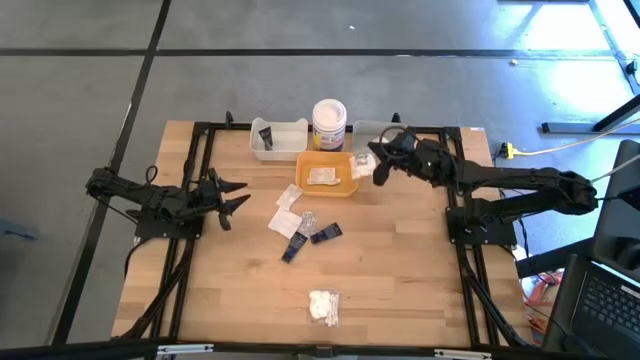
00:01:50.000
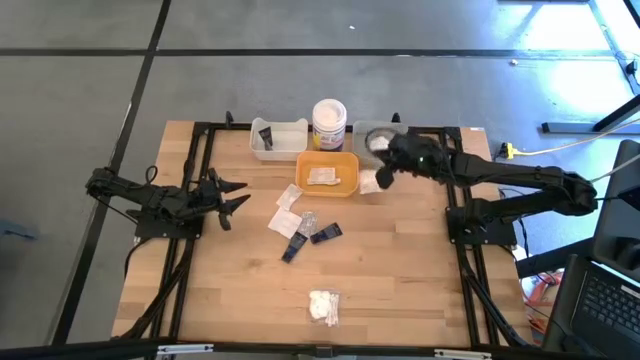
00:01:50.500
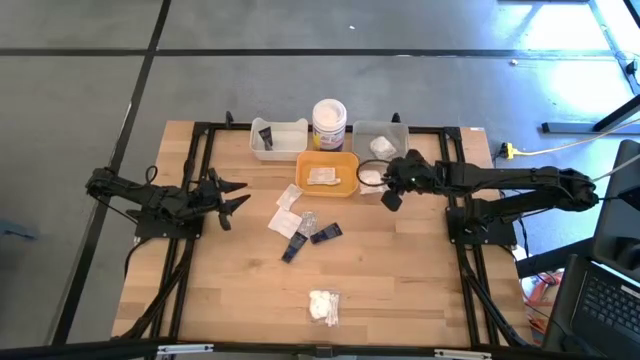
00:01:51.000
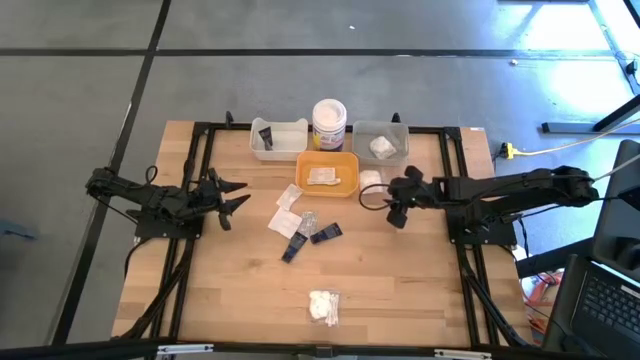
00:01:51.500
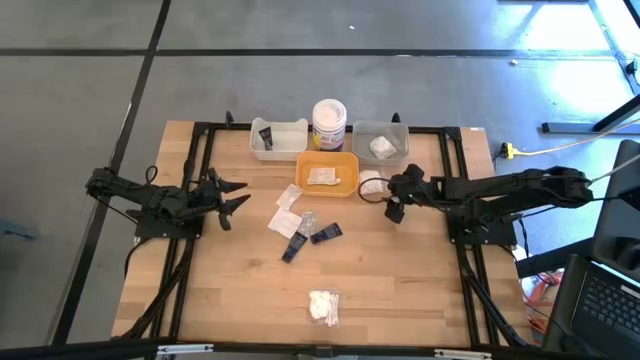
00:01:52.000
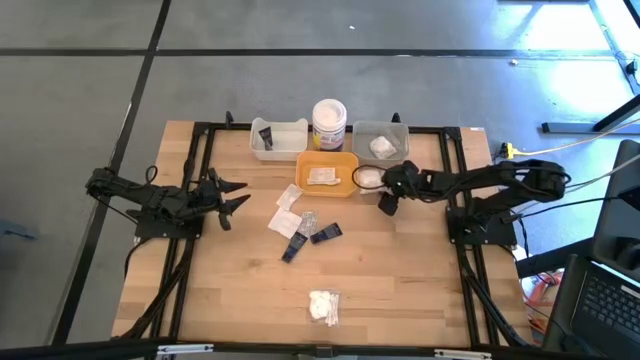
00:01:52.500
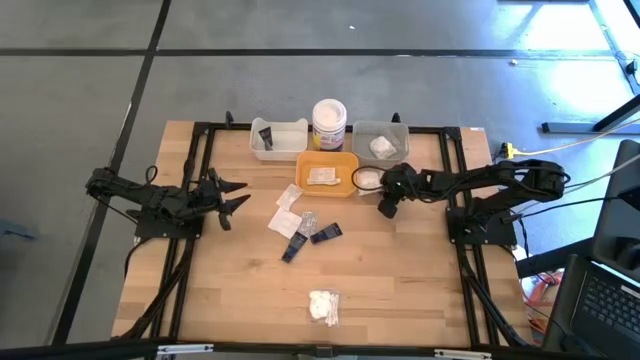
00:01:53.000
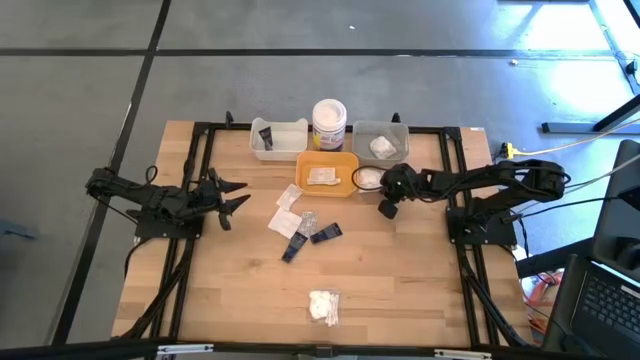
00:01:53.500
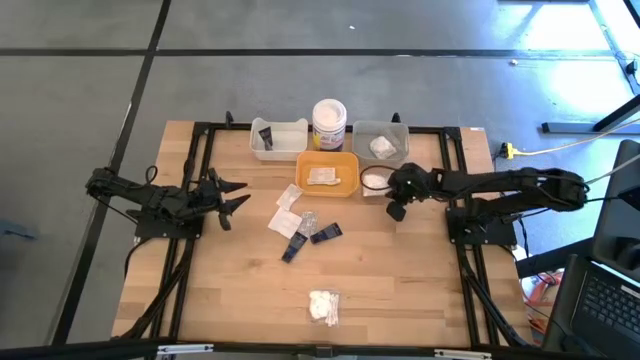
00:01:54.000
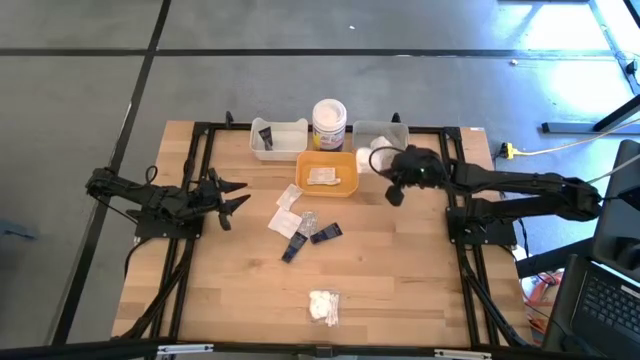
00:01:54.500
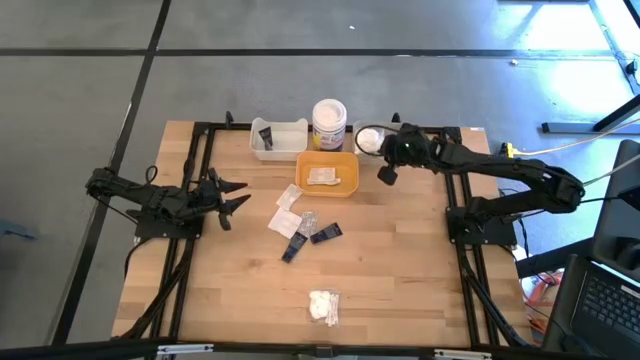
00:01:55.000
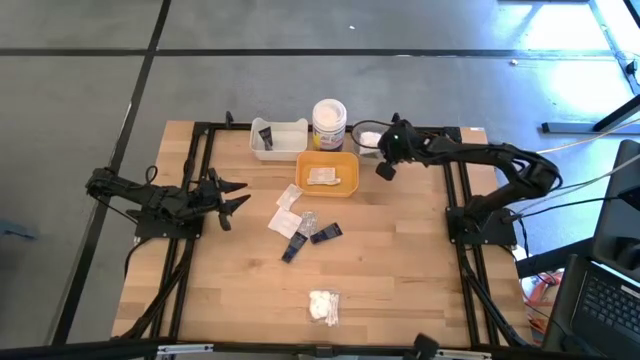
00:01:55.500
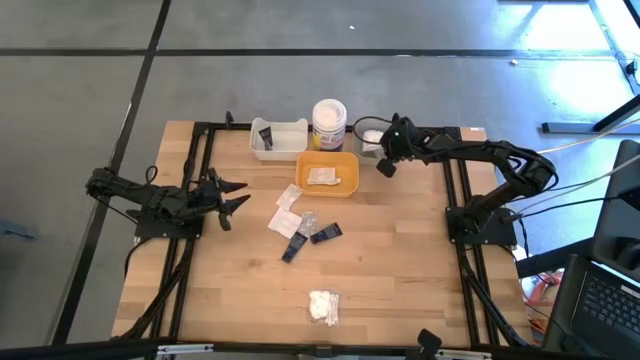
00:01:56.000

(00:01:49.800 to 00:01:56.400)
Task: Pick & Place Travel size toiletries
Put the white cotton pack into the gray bin

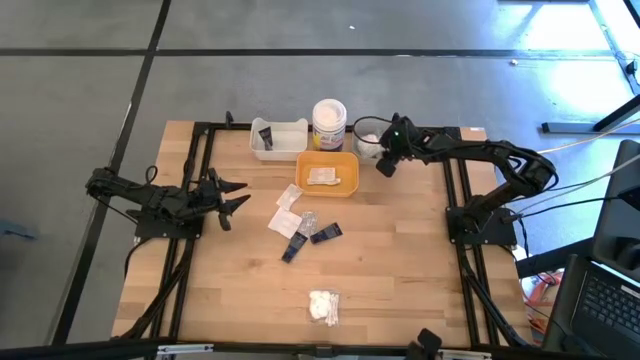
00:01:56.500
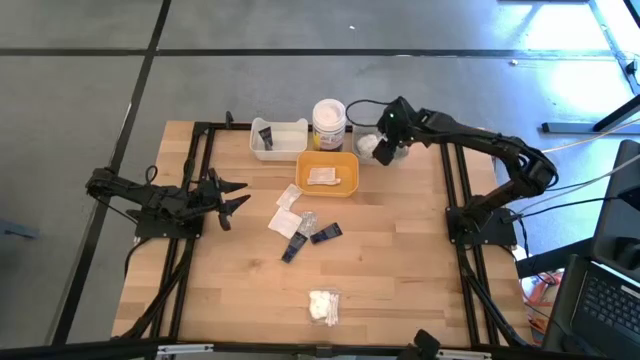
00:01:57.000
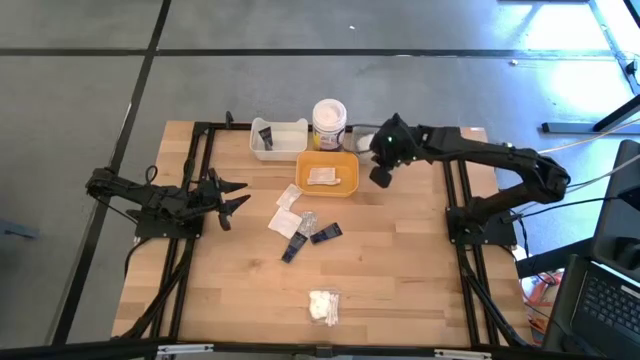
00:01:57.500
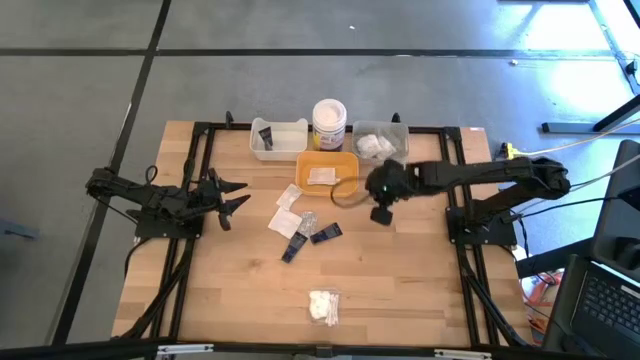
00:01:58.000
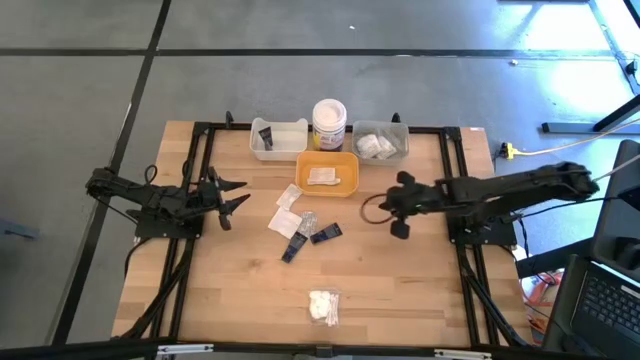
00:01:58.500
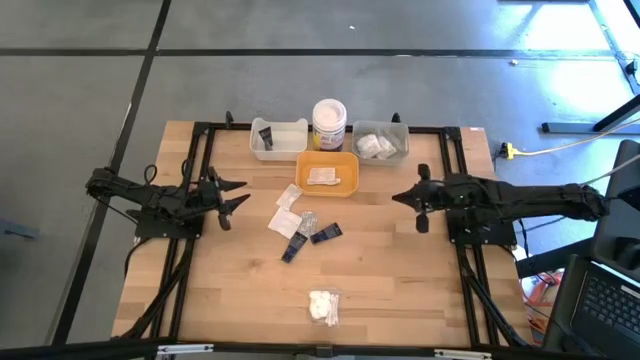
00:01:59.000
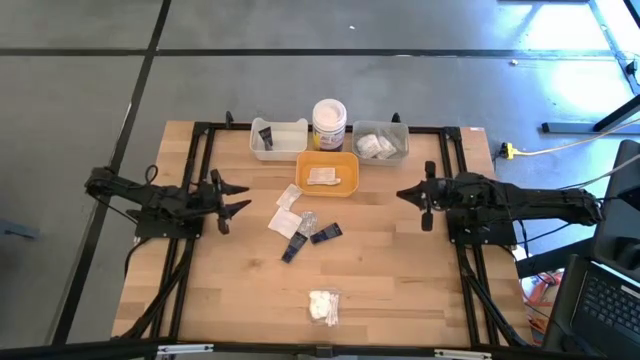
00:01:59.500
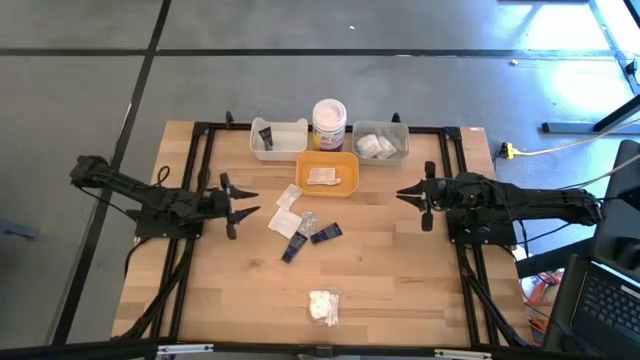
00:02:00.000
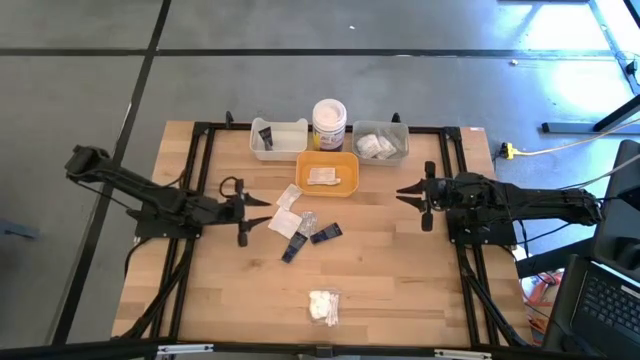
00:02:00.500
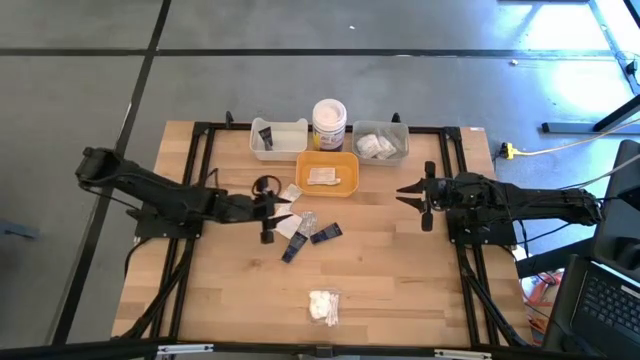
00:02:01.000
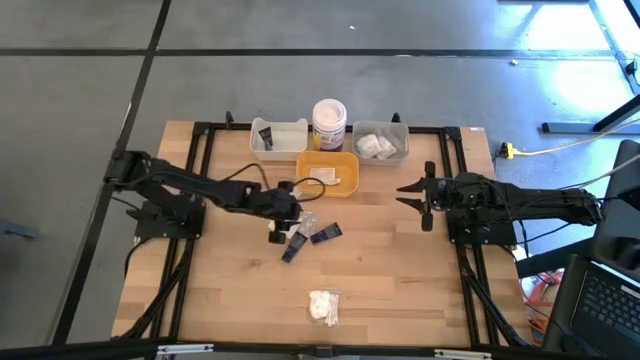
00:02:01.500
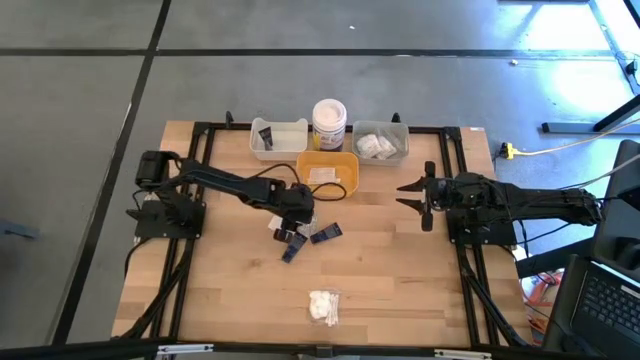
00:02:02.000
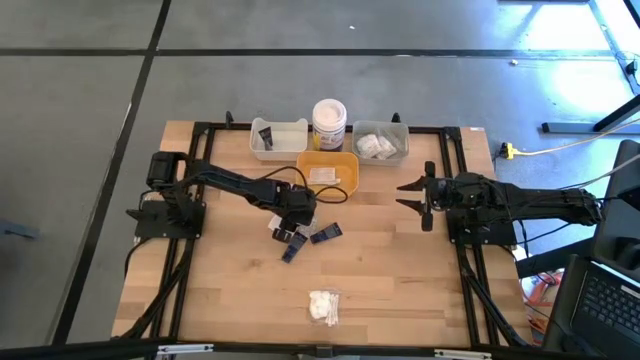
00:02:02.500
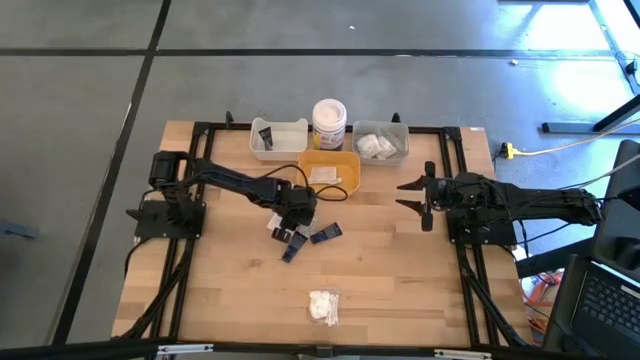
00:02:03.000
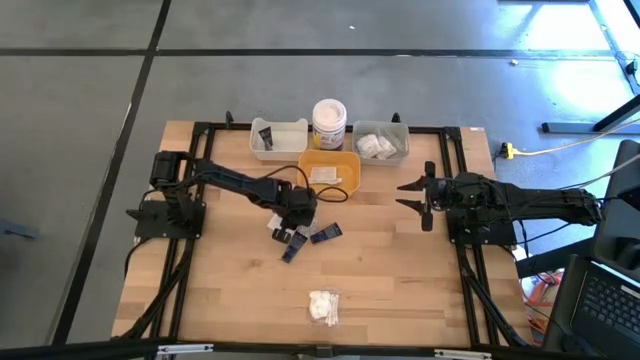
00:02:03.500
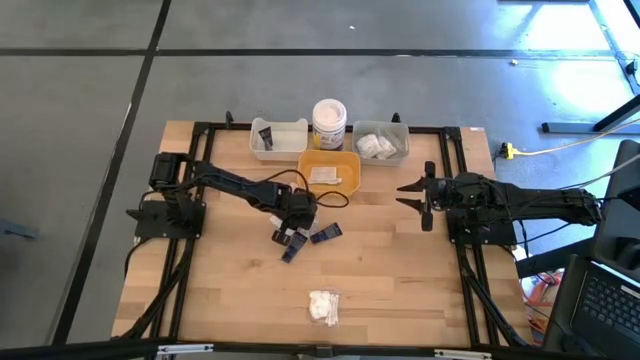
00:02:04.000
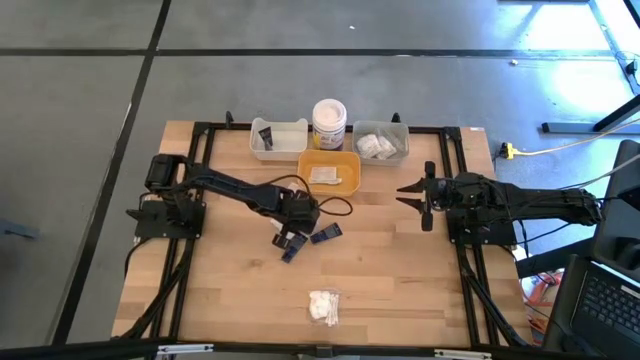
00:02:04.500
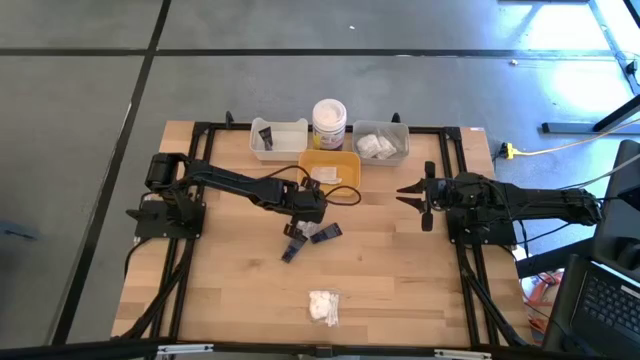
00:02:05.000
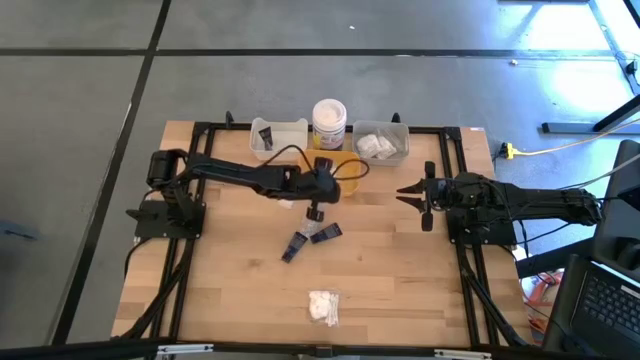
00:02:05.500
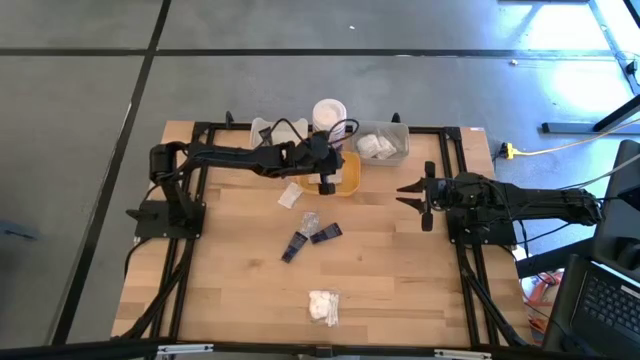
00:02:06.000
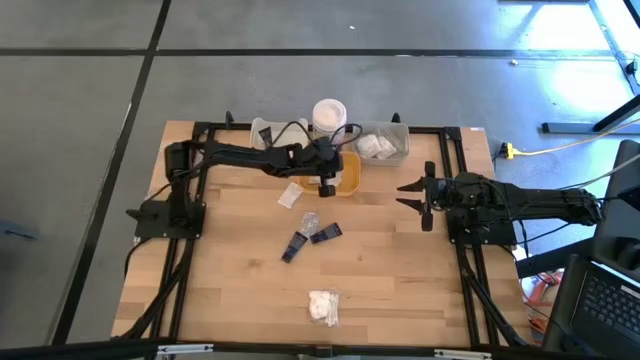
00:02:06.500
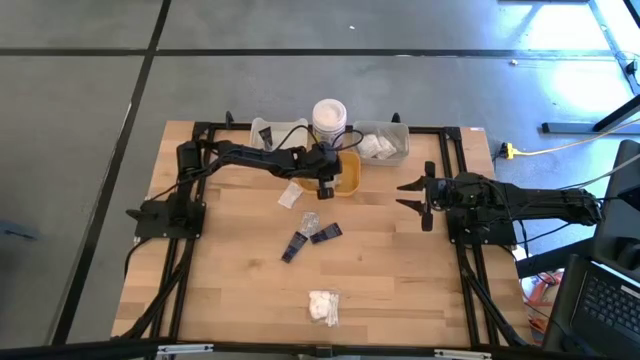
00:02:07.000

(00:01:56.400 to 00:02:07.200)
Put the white bandage into the yellow bin

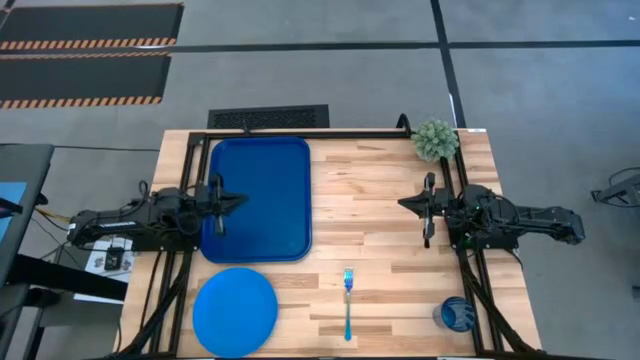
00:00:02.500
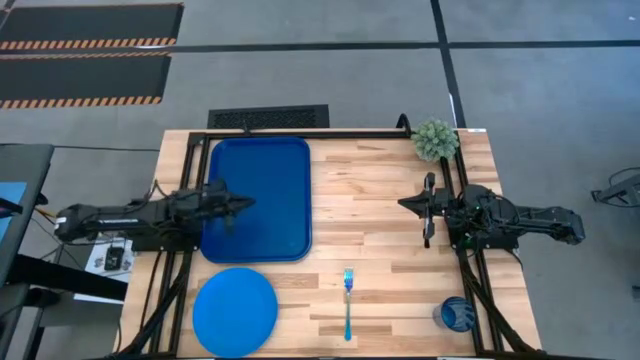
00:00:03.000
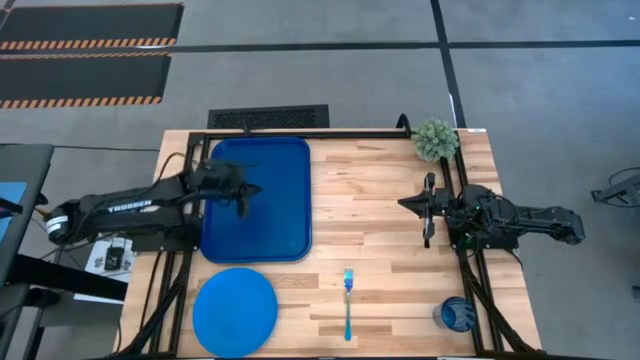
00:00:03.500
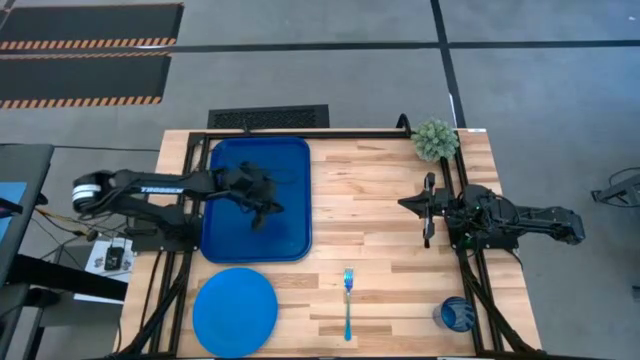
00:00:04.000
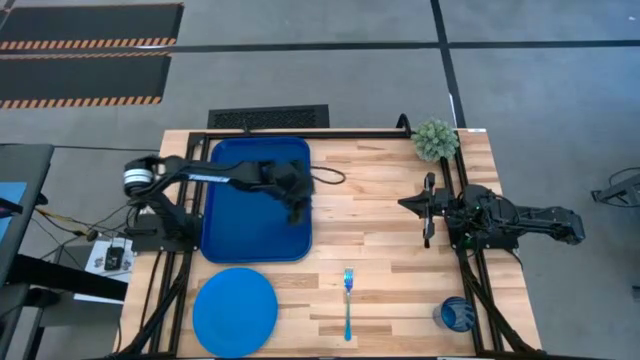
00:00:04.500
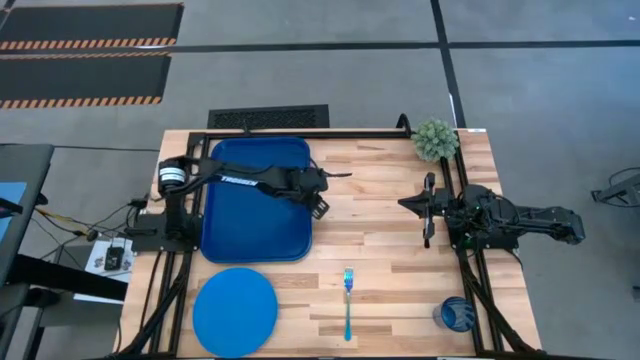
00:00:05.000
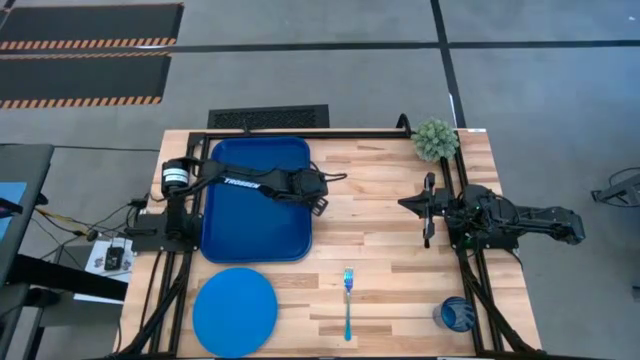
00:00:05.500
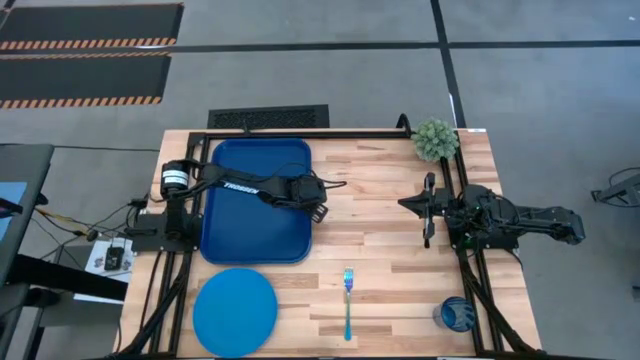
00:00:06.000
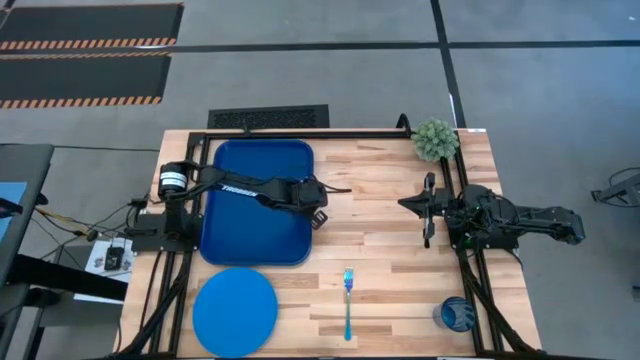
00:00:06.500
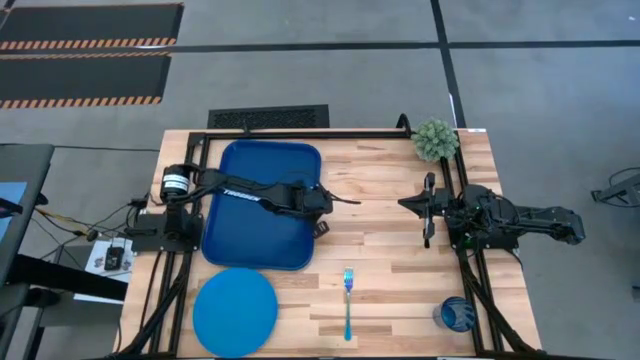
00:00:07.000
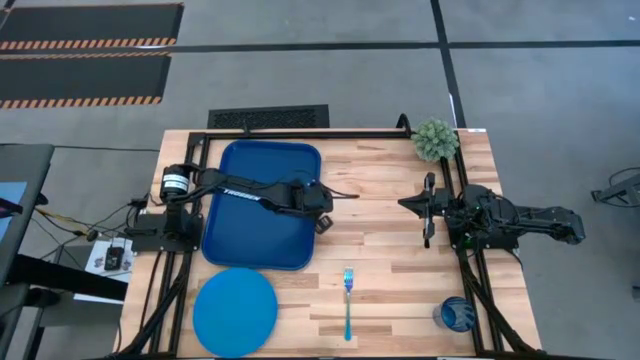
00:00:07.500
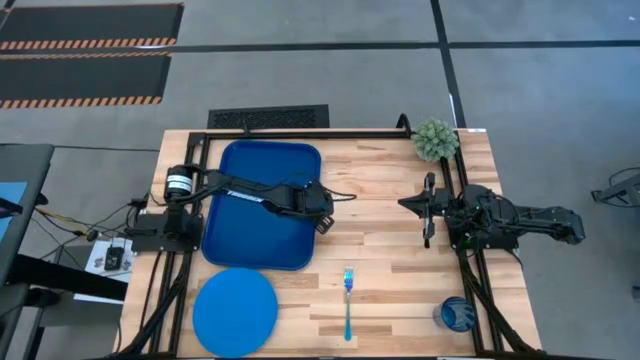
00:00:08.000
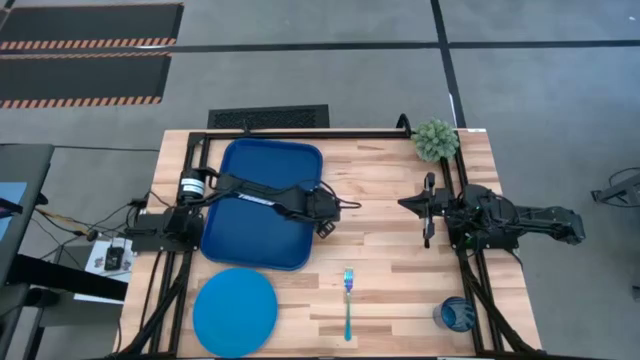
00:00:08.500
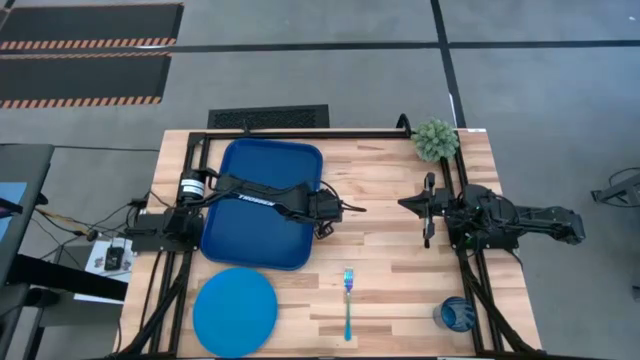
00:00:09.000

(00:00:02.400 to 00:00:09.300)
Task: Pick and place plate/cup/fork/spoon on tray
Move the blue serving tray to the center of the table
